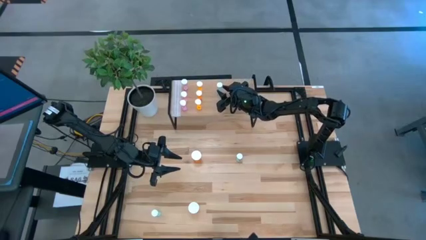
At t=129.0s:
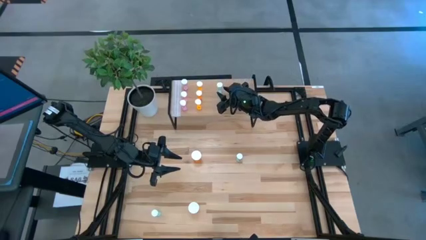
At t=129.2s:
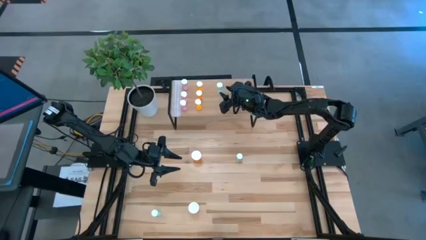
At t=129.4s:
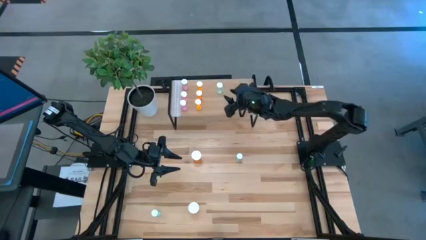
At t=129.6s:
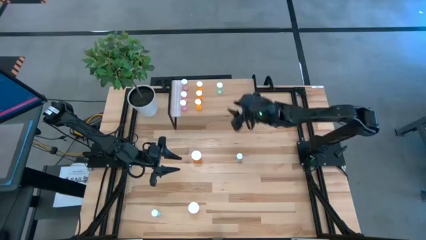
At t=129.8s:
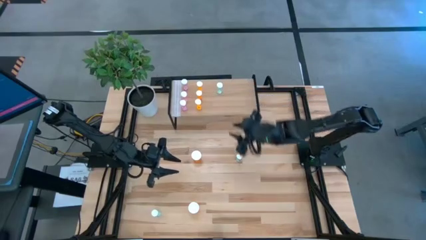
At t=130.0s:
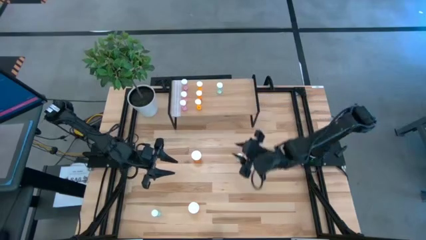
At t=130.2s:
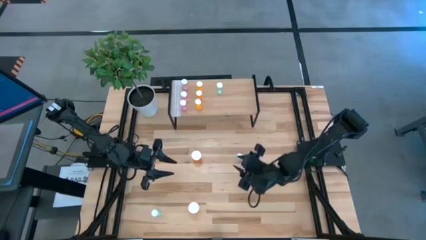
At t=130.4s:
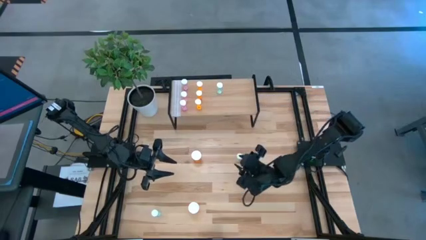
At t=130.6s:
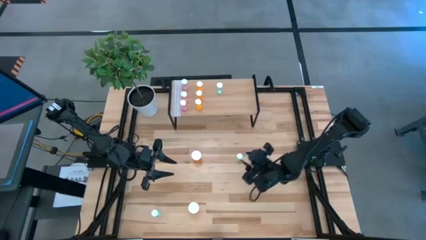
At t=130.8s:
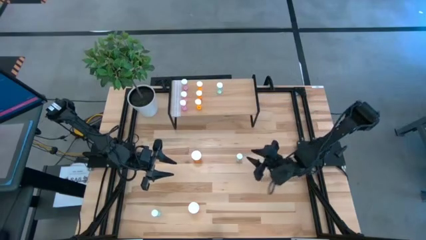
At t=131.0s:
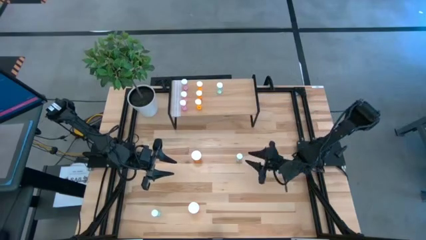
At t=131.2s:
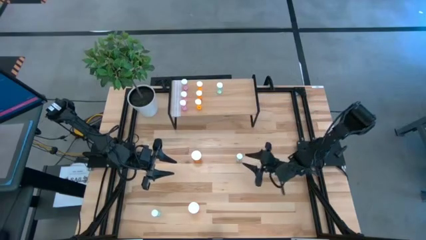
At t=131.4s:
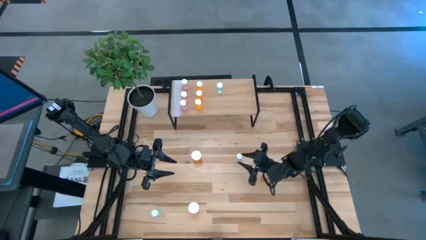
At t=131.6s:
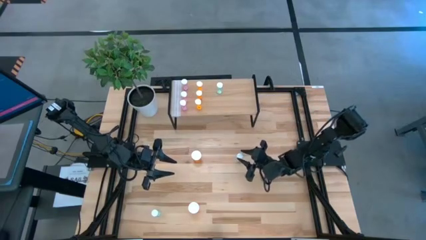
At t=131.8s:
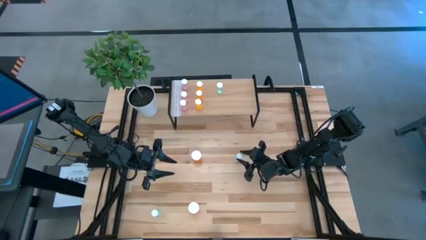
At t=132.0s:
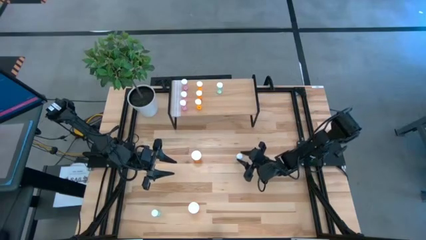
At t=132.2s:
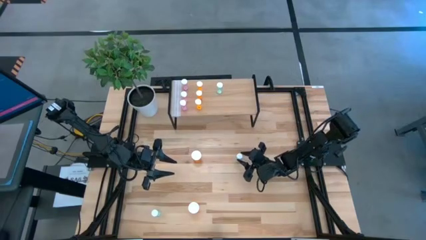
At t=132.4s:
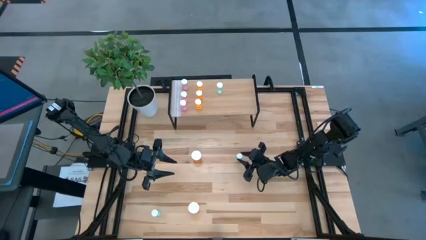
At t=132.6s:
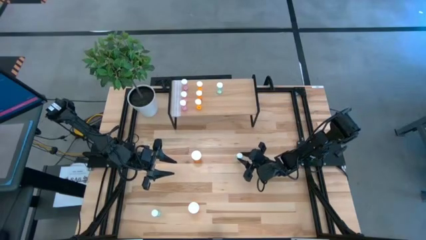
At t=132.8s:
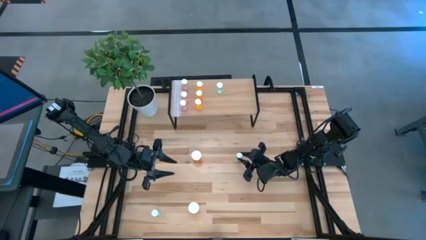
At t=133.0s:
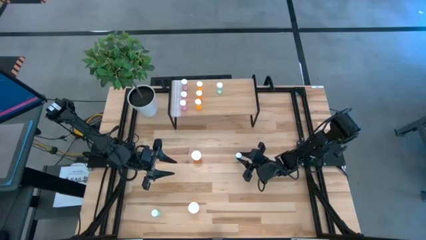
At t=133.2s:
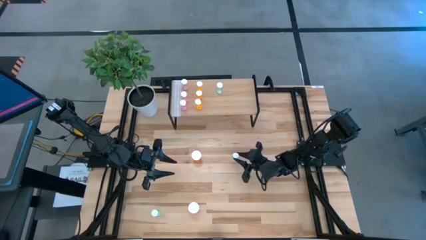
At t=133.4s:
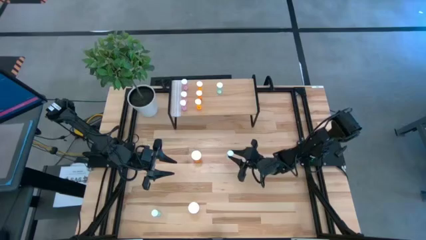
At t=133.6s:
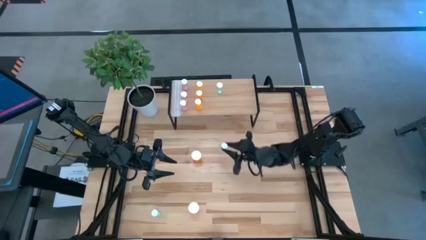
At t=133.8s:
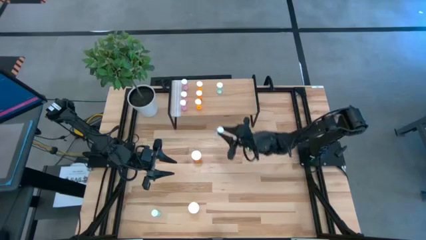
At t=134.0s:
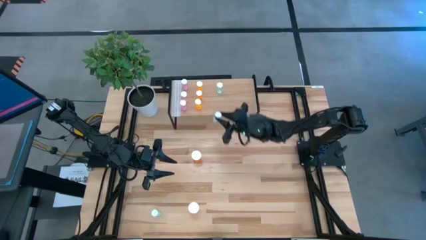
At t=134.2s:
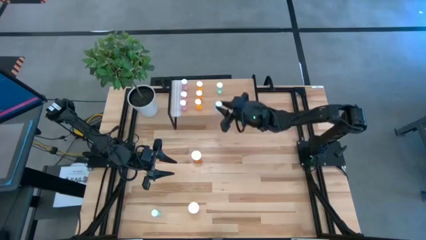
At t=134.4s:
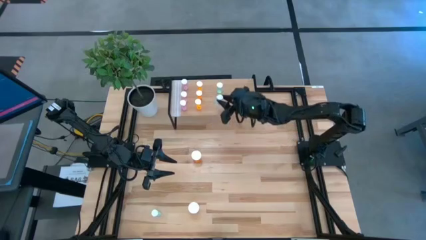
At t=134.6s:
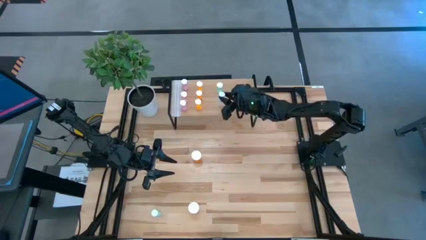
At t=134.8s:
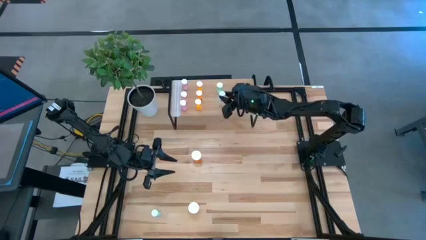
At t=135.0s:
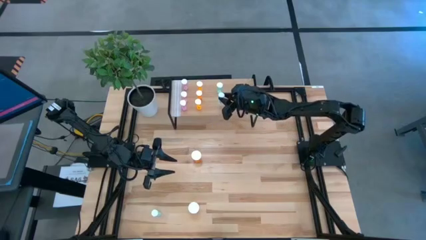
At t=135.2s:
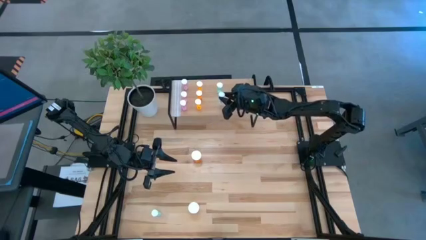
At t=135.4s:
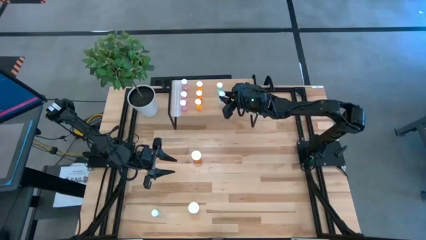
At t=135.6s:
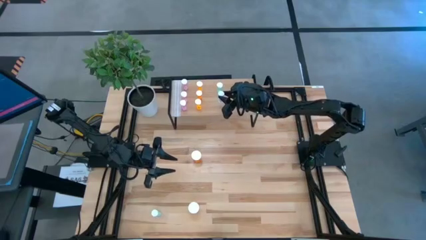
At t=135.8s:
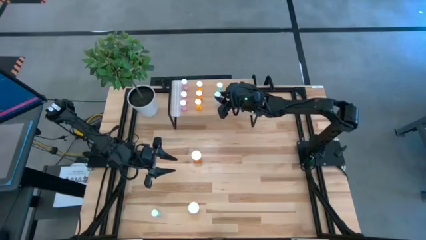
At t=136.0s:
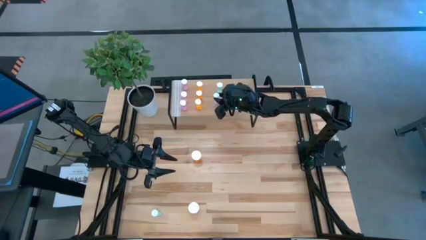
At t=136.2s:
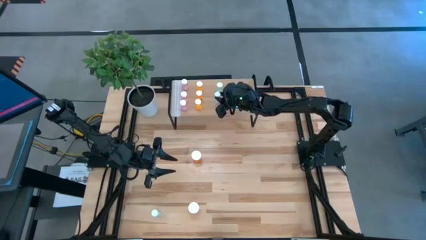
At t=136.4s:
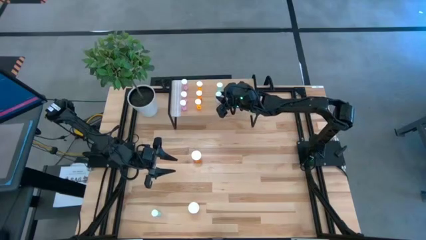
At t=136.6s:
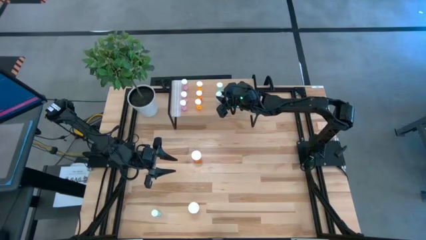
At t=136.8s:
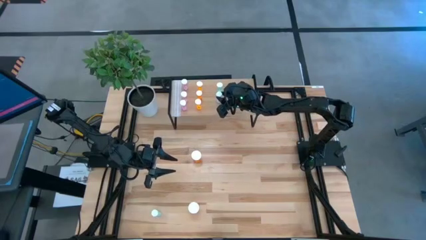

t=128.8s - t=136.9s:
Task: Pick and place medicine bottles onto shelf by color
Put the top blue pill bottle on the shelf aligned with the other blue pill bottle

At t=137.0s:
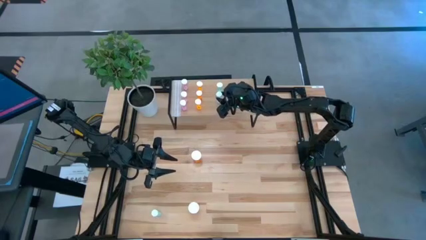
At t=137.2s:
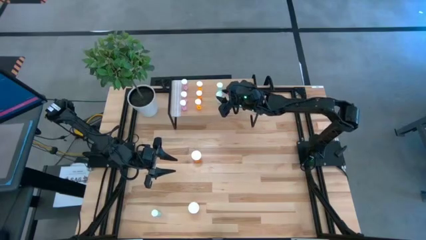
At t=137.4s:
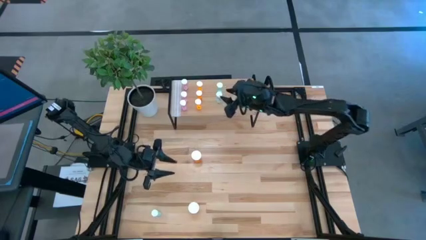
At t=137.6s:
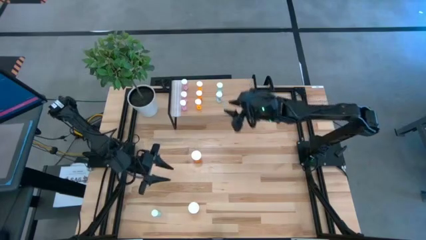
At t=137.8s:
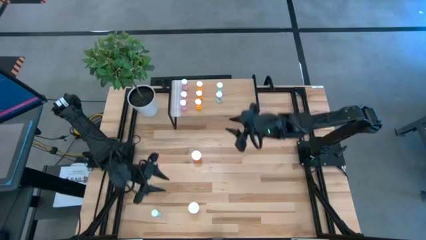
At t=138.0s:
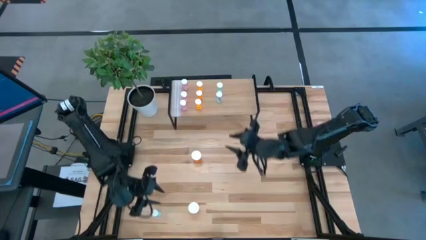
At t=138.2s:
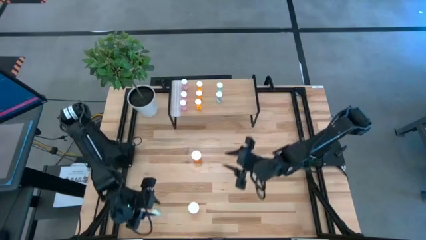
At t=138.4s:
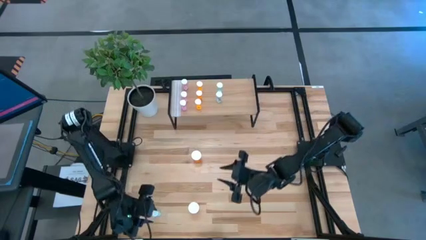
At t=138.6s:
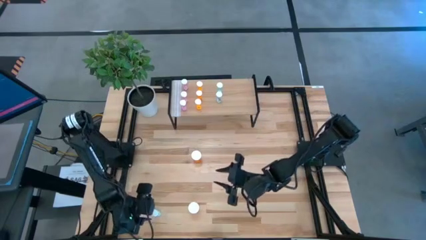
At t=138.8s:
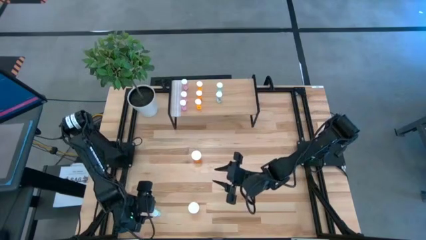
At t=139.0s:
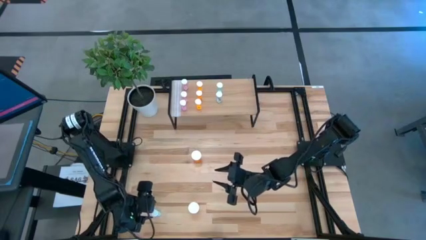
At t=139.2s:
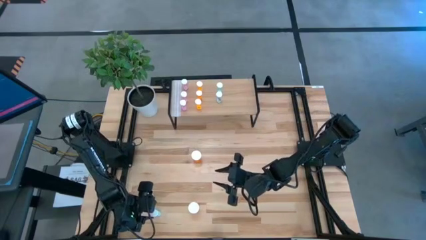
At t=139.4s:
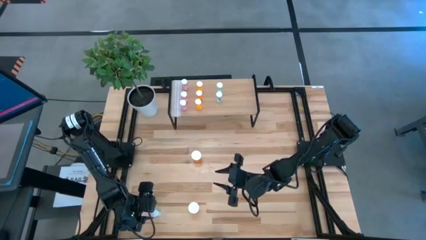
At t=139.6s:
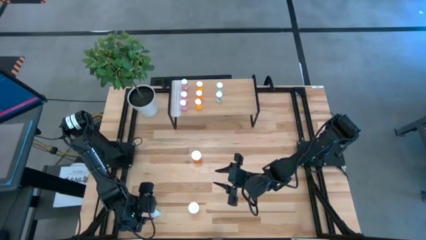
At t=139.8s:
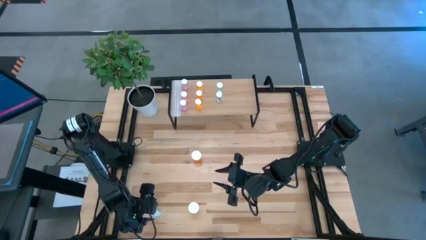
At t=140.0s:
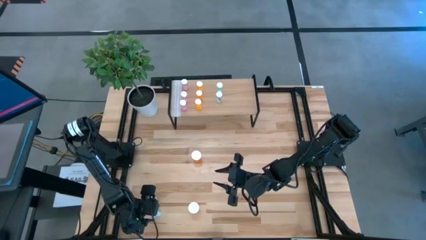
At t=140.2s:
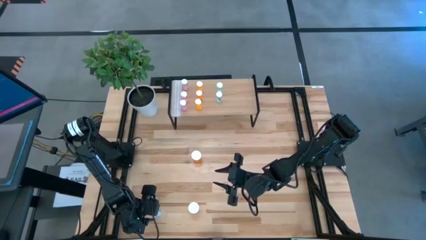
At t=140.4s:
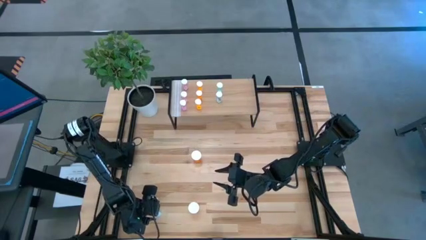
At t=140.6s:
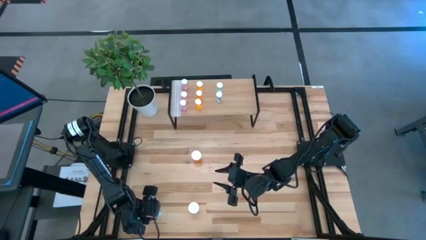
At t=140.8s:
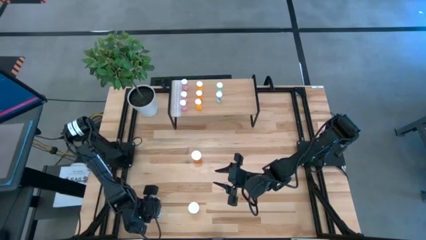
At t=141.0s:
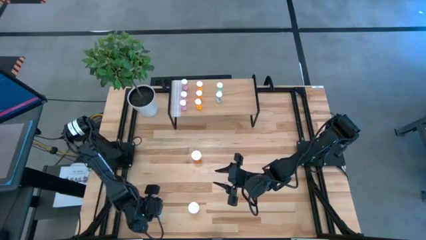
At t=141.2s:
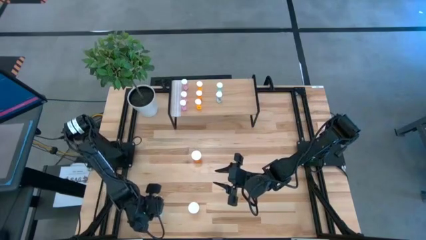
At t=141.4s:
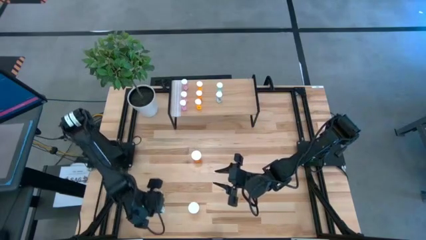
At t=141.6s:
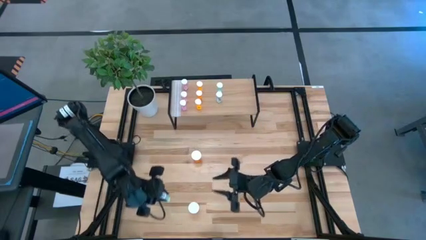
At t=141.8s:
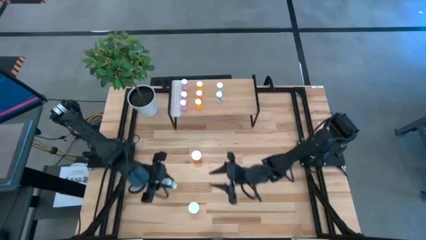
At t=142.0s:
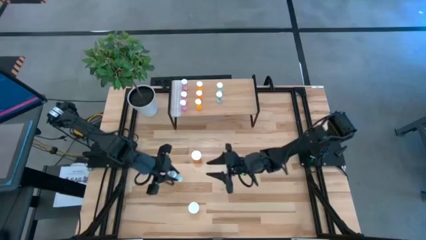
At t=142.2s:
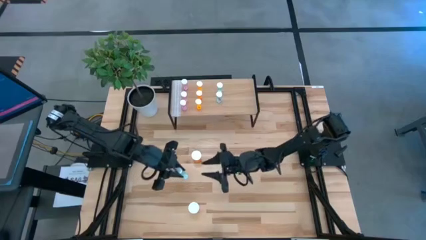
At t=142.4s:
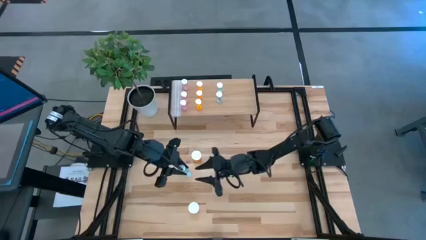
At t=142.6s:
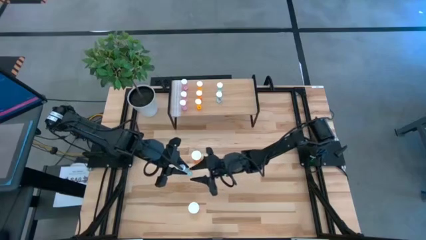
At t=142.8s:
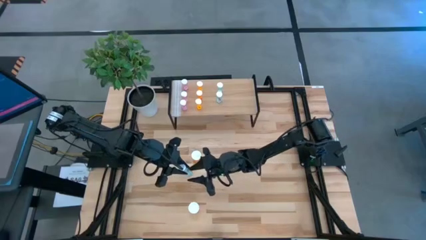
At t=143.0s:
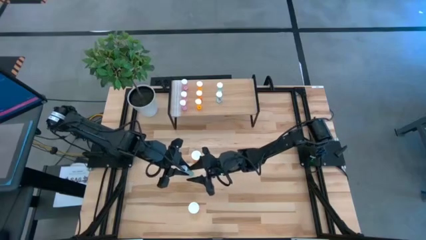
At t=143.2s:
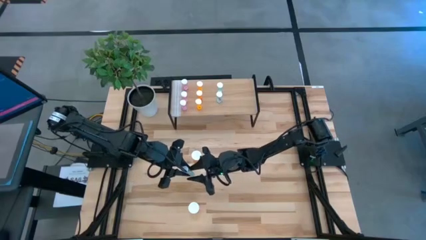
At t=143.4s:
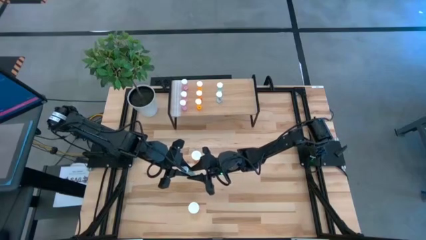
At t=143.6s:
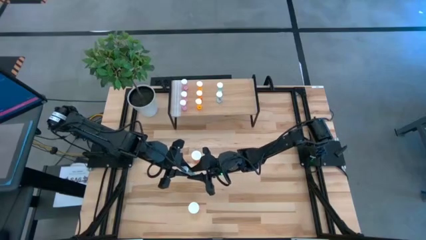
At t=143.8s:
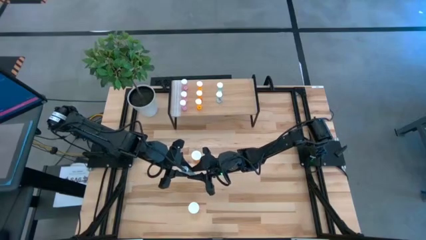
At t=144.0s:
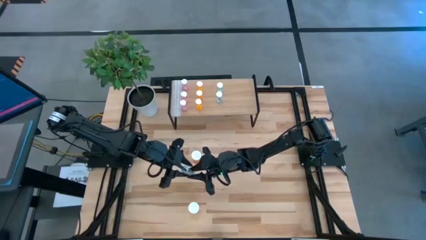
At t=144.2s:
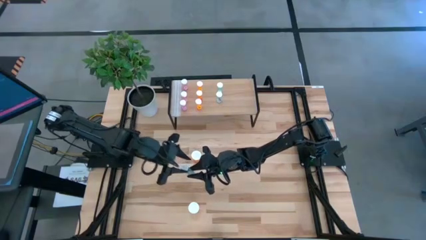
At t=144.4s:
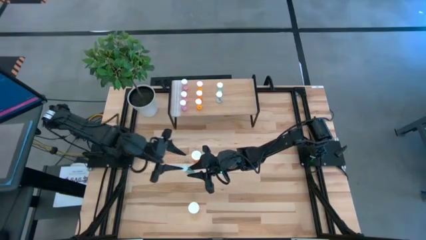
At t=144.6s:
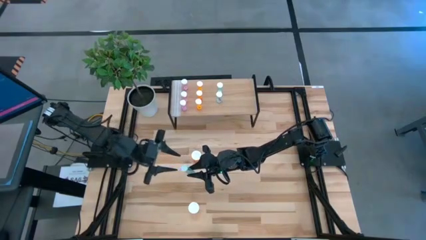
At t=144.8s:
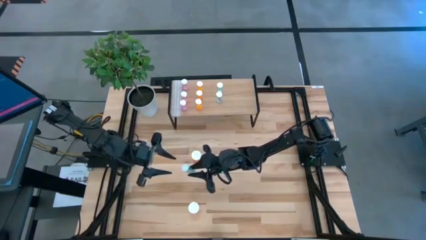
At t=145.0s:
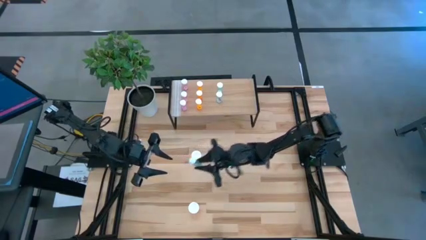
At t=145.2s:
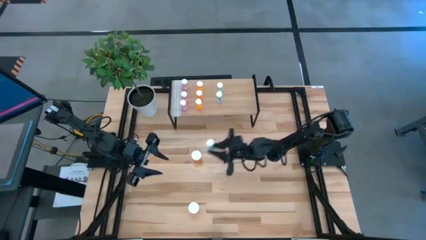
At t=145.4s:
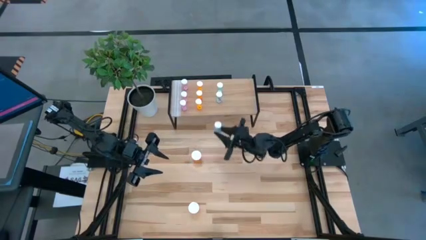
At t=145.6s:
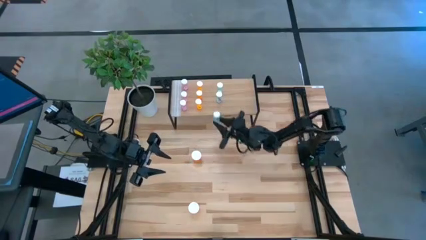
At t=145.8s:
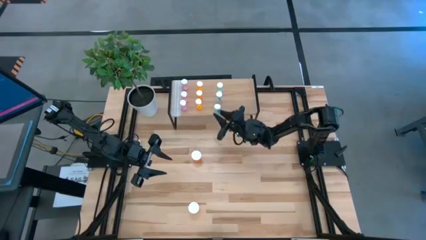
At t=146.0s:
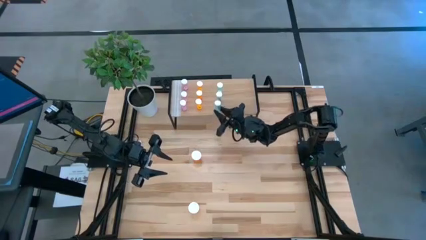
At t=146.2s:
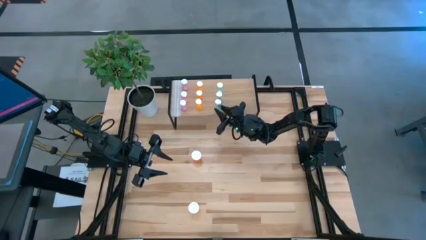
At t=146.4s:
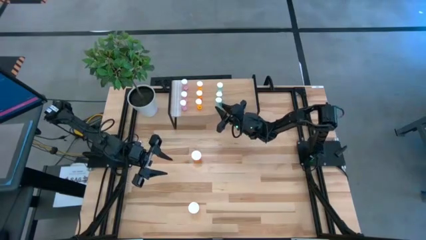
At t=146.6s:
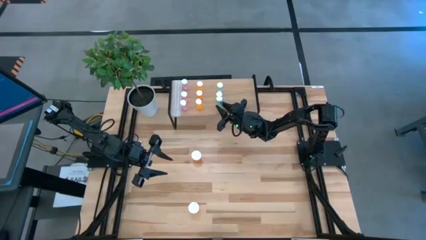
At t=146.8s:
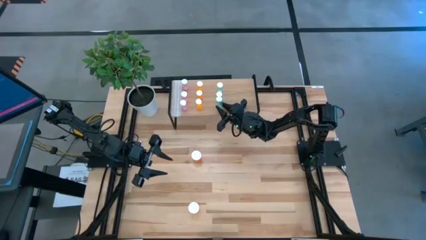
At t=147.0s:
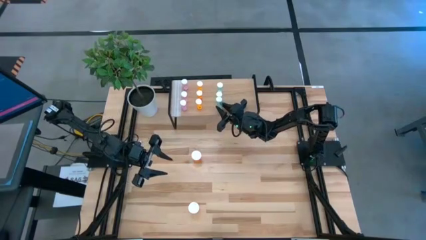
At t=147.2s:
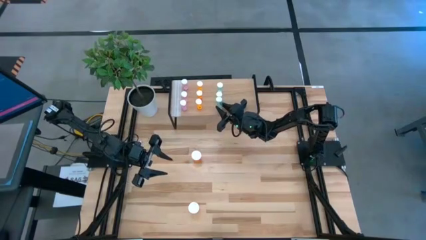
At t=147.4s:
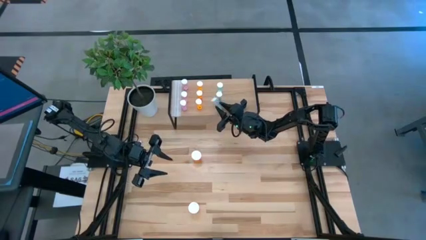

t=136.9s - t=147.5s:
Put the blue pill bottle on the shelf aligned with the other blue pill bottles
